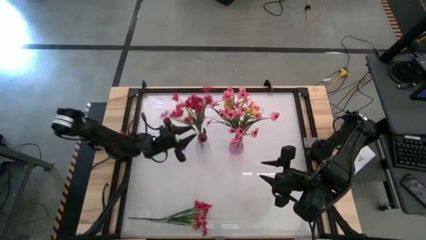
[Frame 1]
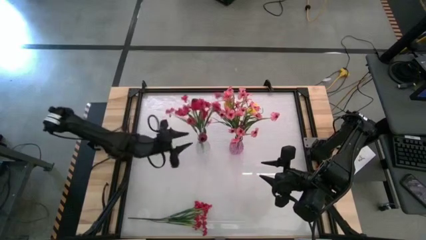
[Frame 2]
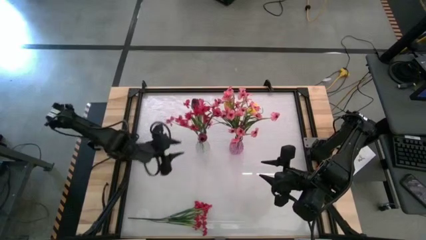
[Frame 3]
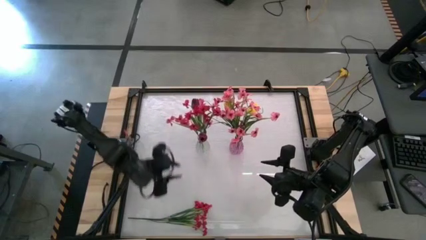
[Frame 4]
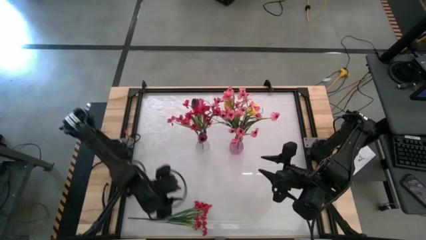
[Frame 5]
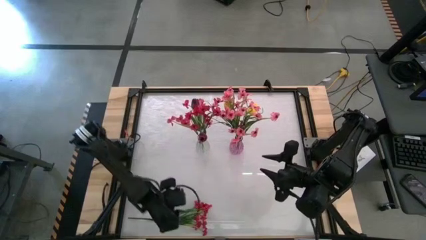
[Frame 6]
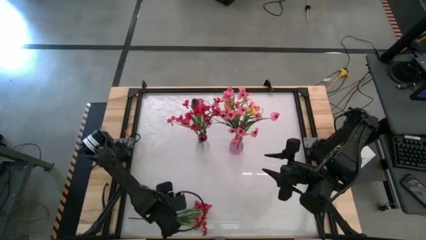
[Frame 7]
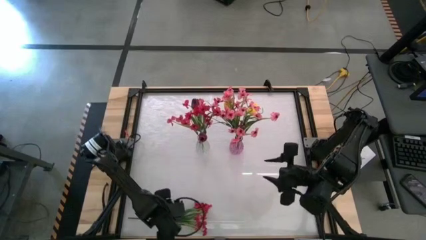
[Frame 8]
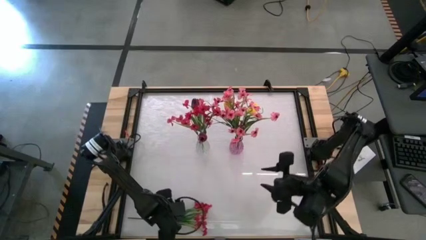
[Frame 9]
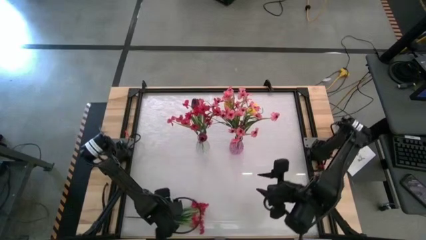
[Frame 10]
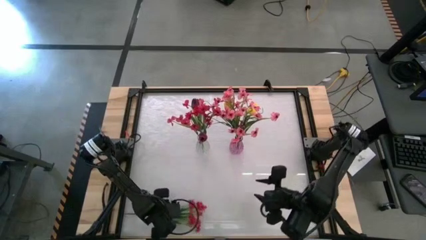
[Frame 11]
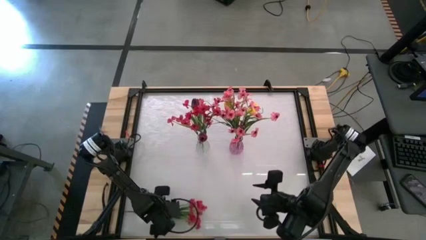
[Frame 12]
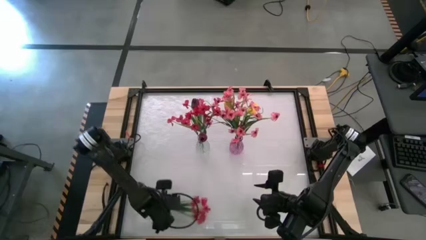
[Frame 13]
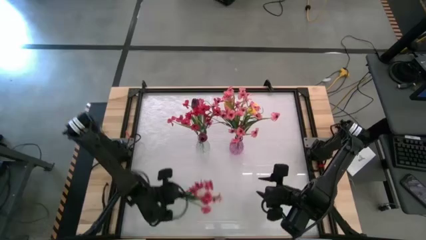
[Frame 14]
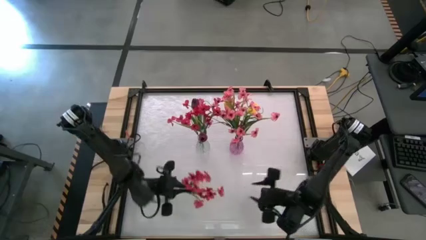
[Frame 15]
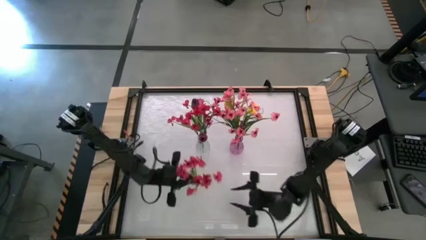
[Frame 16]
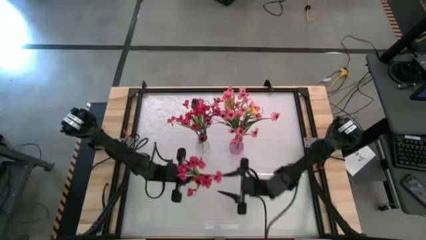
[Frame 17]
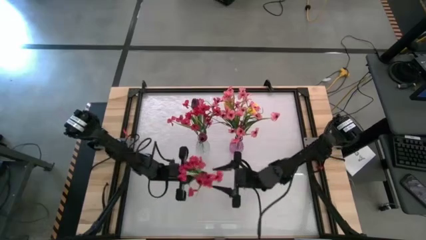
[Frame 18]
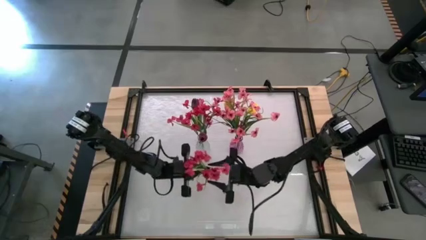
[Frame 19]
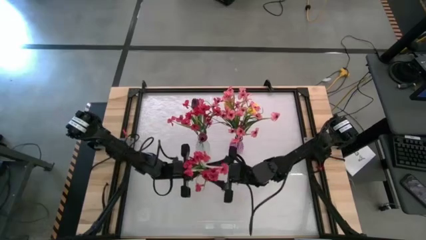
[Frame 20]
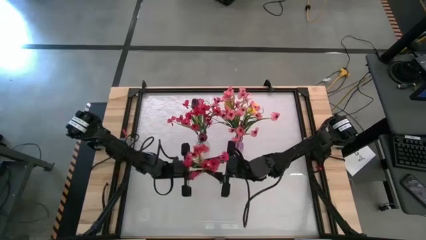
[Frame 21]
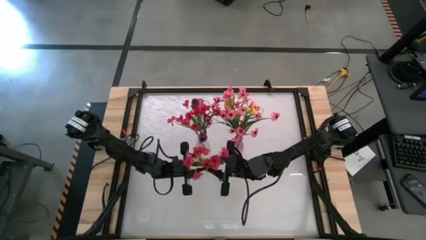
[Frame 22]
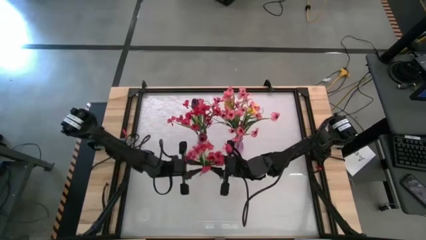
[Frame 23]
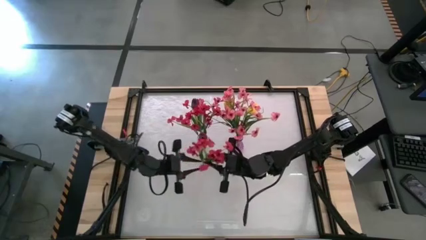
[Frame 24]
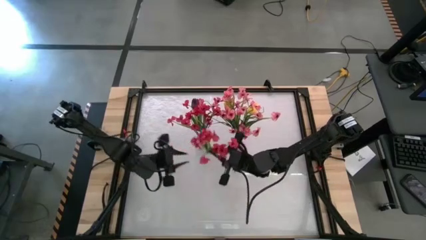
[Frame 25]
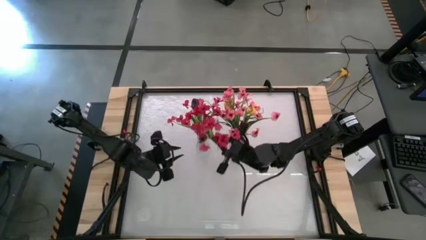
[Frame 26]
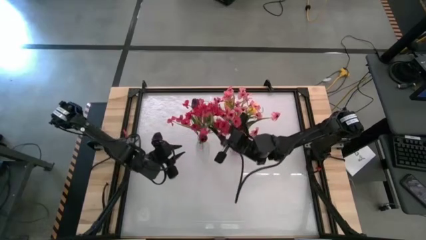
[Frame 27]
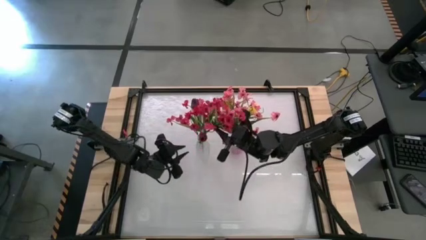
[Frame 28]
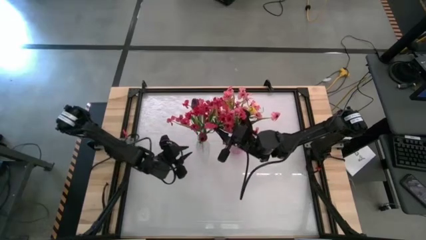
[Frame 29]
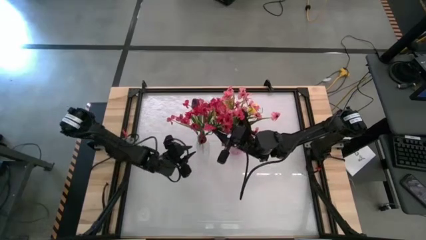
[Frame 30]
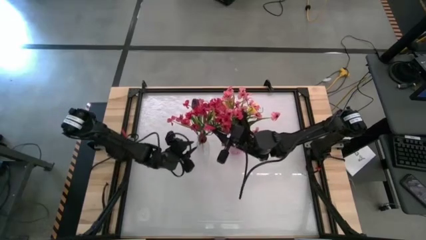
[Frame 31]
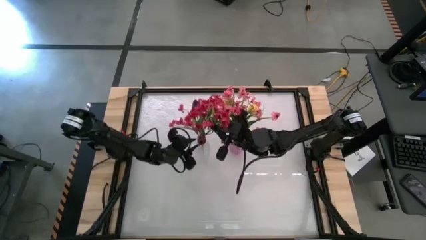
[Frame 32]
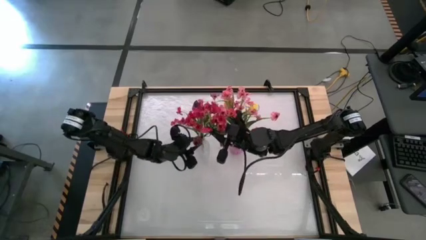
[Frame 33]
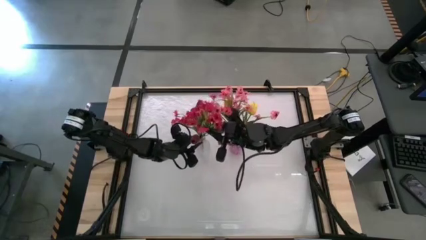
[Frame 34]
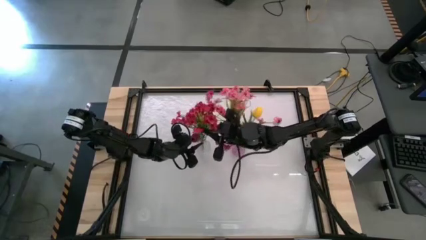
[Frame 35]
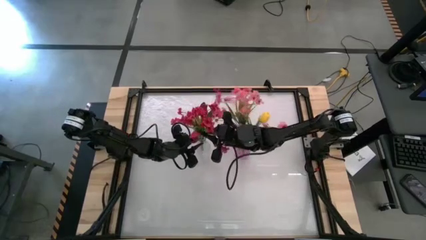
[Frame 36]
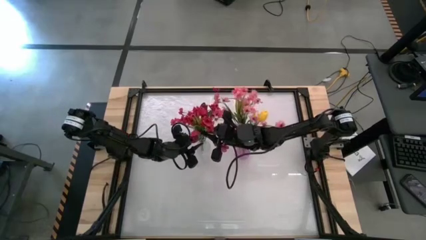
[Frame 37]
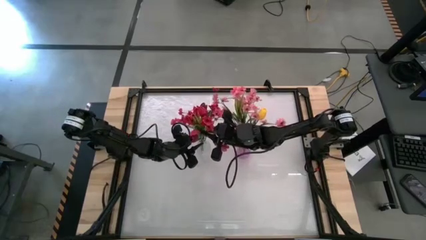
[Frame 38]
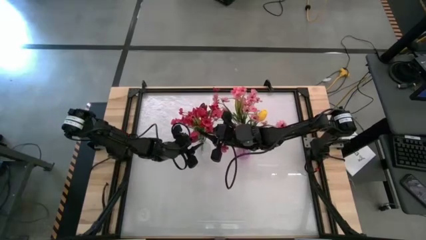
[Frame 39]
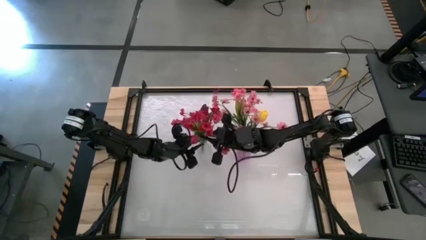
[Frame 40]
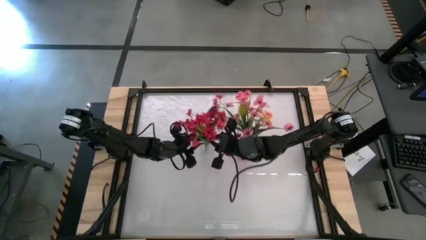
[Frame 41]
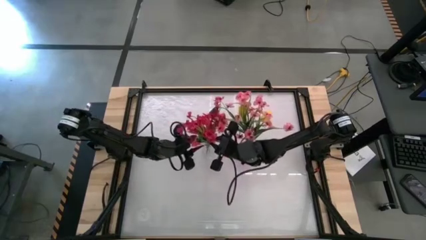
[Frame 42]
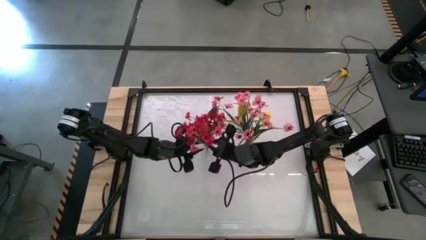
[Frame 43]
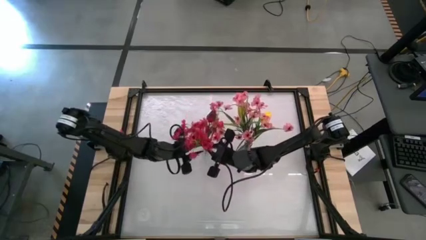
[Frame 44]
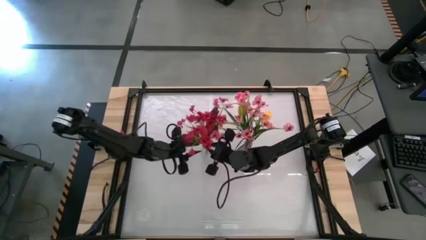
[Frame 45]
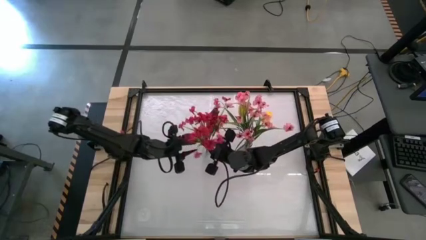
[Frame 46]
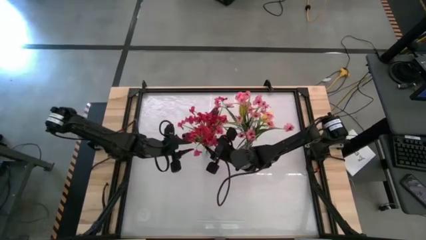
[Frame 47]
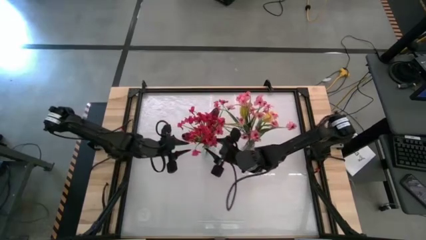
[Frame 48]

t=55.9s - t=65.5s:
Task: Sort flowers into vase by color
Put the red flower into the transparent vase

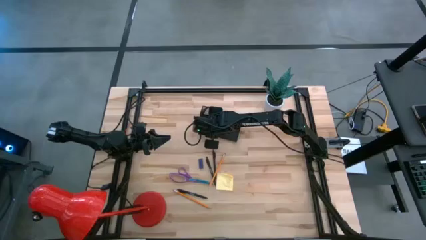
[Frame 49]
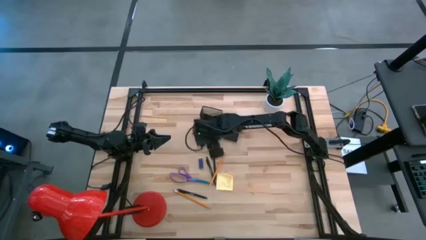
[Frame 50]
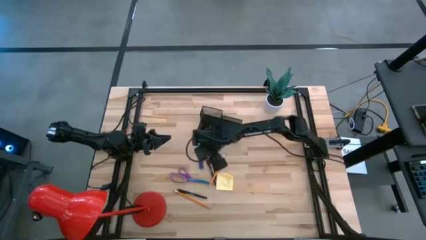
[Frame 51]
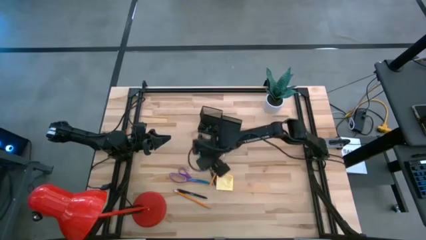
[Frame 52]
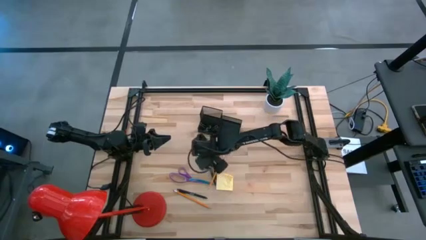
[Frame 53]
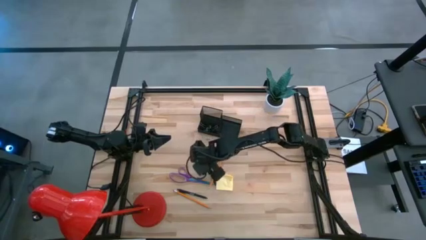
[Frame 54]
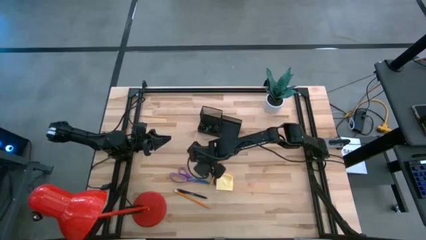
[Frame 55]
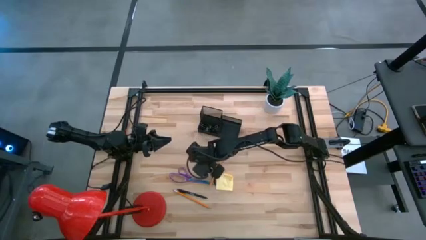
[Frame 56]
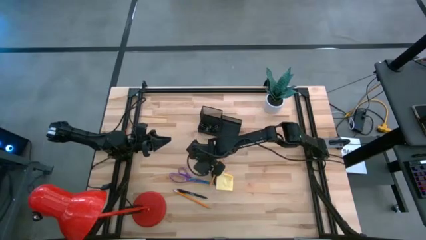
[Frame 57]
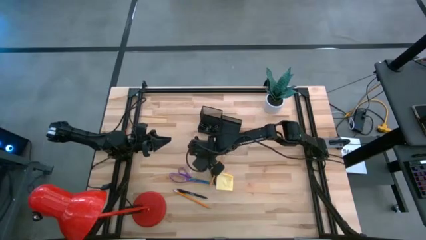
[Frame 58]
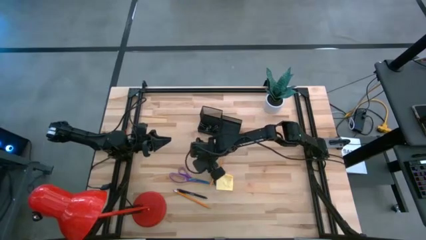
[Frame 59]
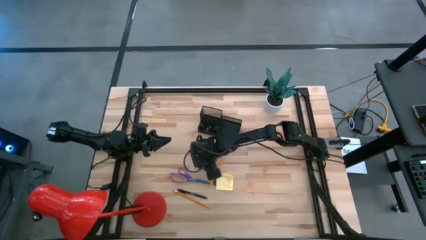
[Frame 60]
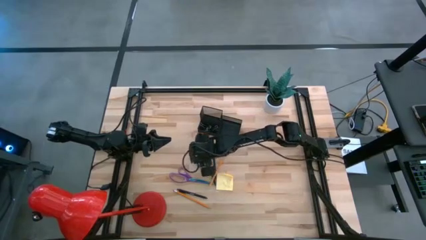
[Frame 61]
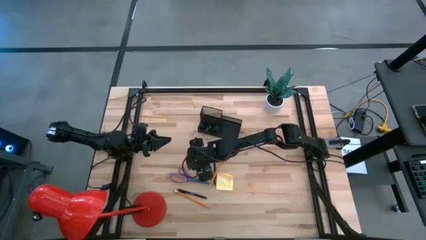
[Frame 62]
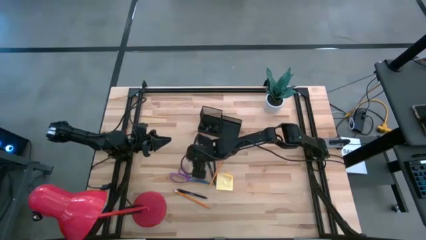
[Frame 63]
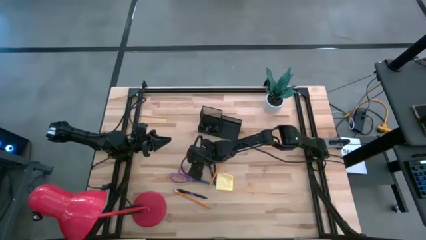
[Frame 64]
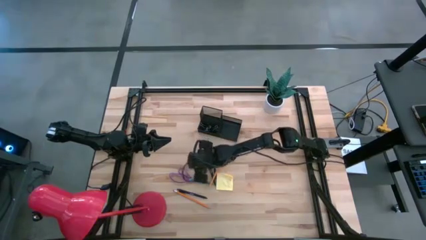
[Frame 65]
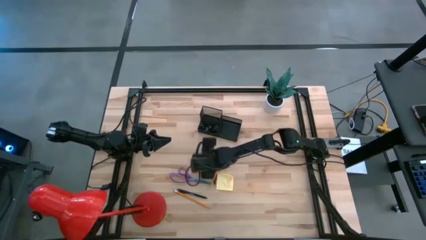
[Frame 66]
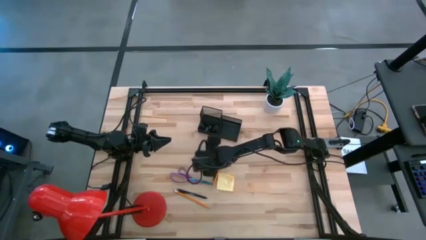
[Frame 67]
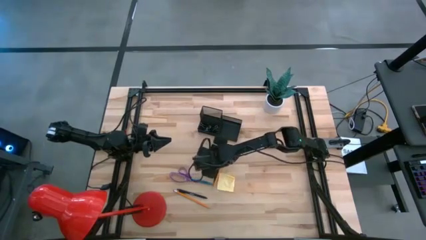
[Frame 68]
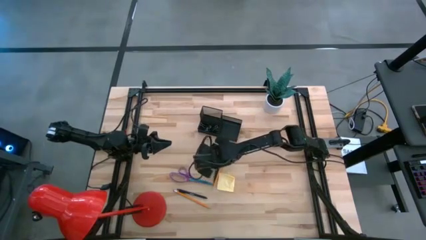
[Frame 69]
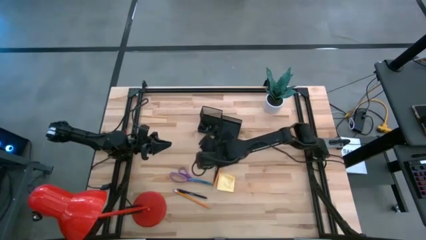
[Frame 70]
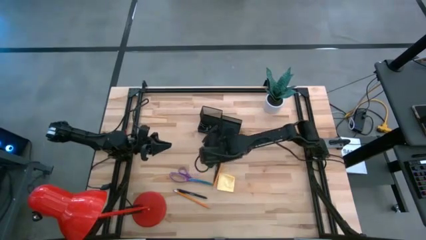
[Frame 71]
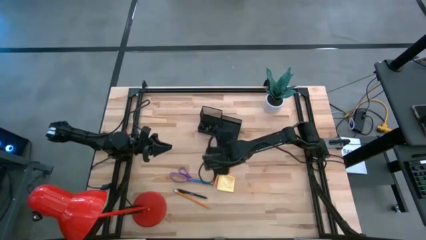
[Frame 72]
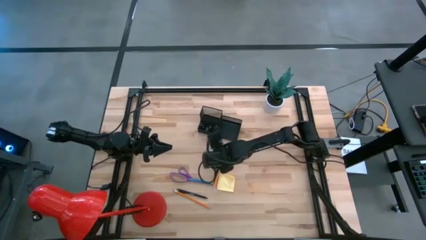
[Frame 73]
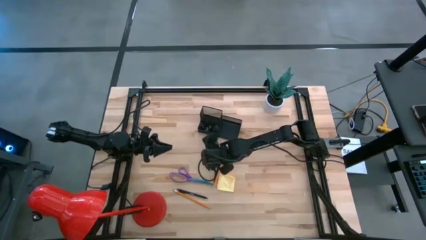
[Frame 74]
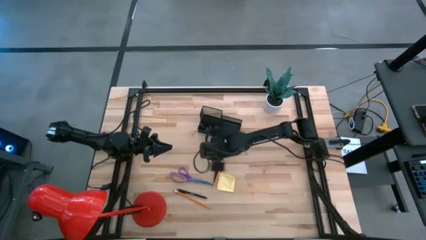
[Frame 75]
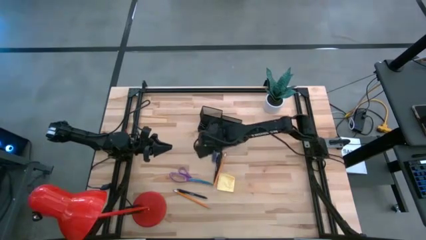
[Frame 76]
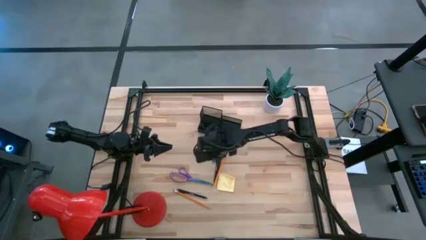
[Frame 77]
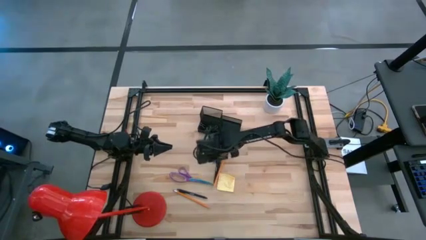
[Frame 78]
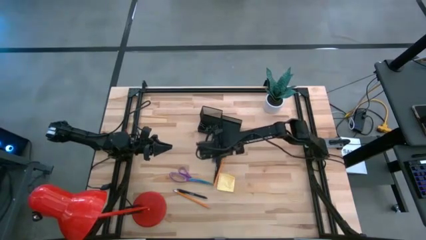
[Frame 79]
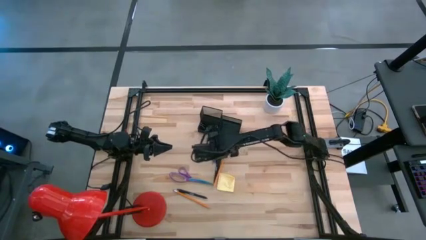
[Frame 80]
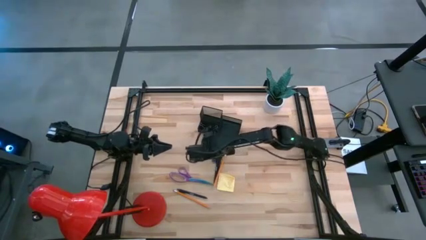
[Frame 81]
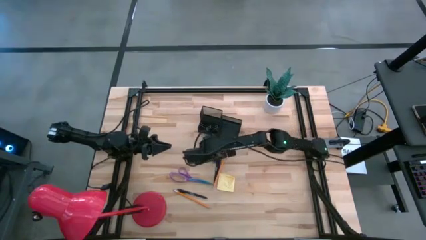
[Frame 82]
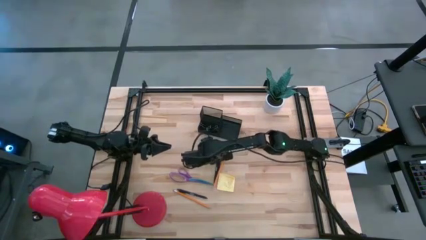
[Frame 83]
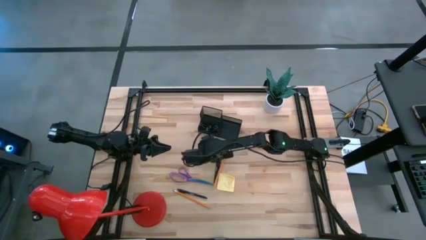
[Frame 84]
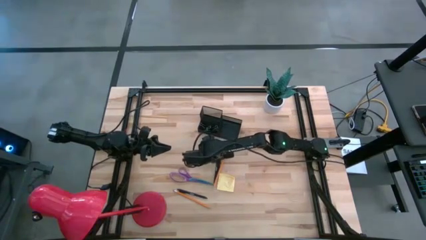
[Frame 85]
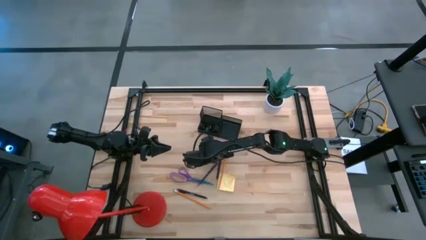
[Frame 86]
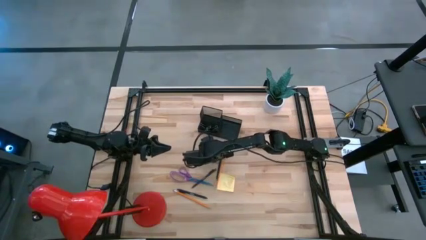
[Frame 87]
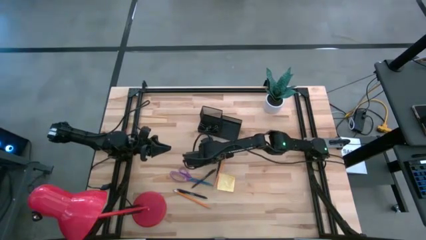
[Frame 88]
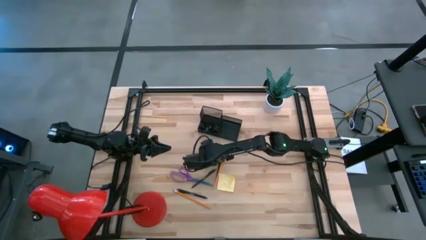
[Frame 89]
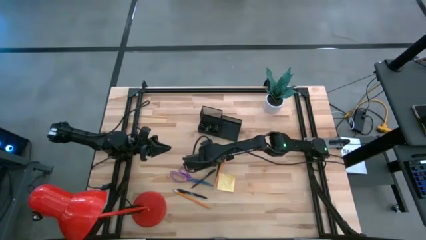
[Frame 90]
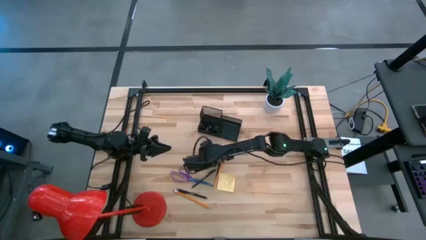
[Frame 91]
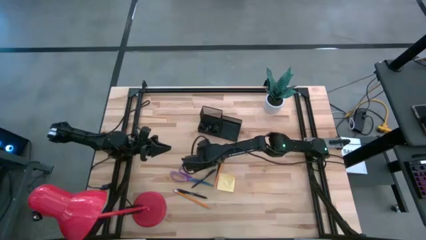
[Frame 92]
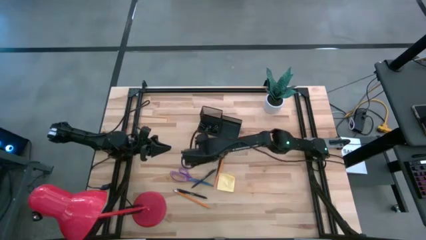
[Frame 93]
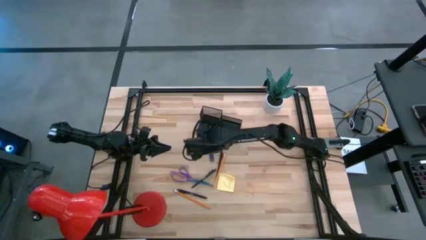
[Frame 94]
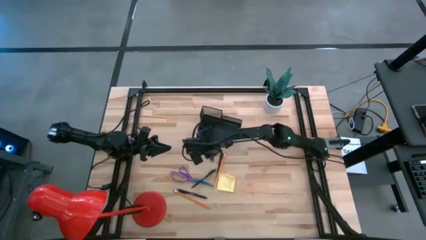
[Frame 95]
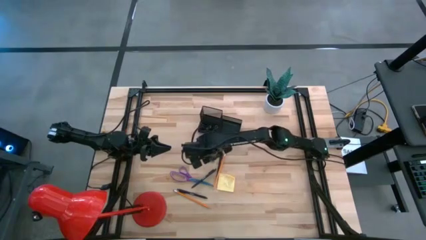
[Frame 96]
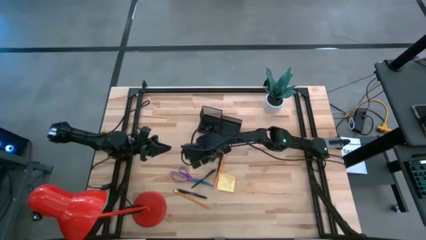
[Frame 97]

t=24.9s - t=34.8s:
Task: Pick and place office supplies into organizer
Put the blue eraser into the desk organizer
